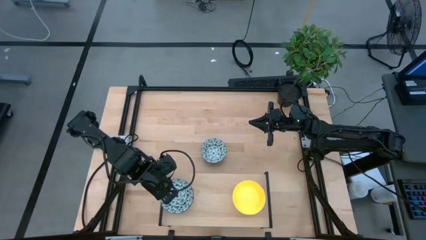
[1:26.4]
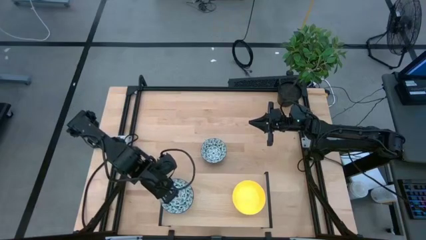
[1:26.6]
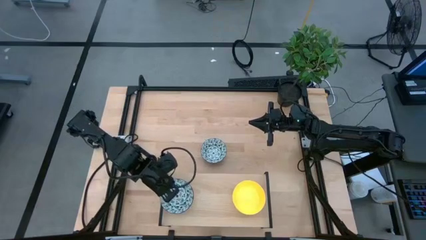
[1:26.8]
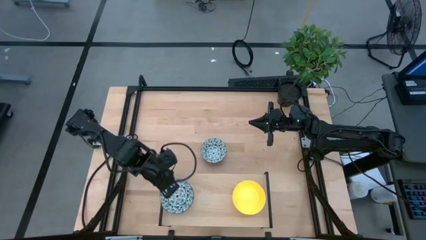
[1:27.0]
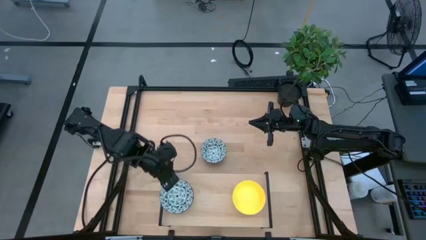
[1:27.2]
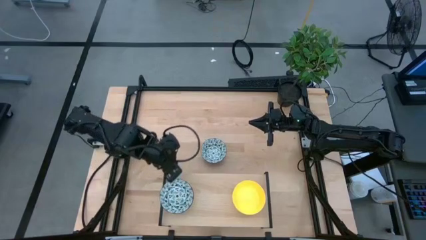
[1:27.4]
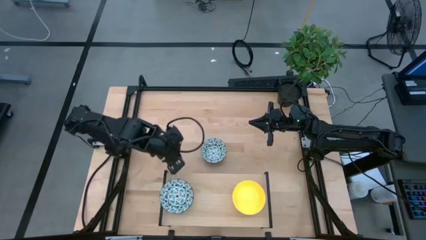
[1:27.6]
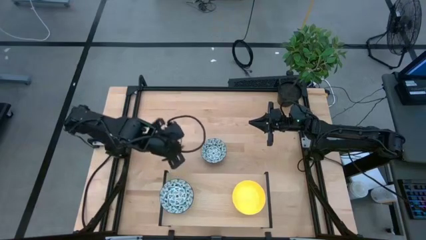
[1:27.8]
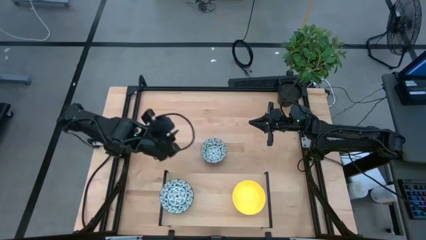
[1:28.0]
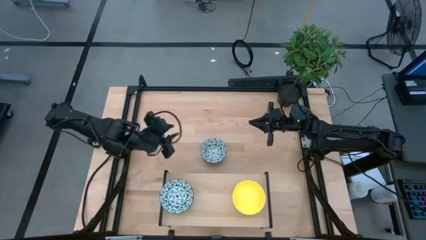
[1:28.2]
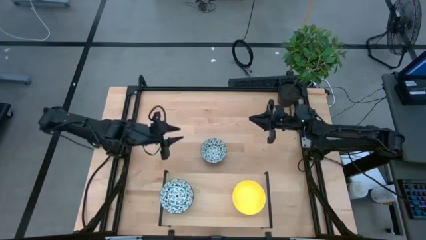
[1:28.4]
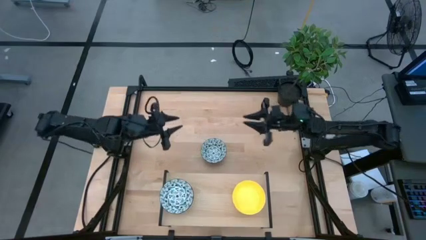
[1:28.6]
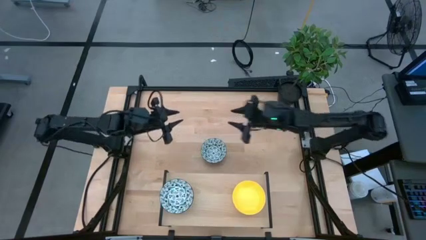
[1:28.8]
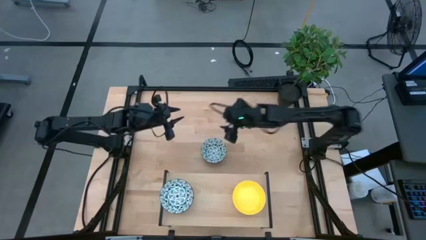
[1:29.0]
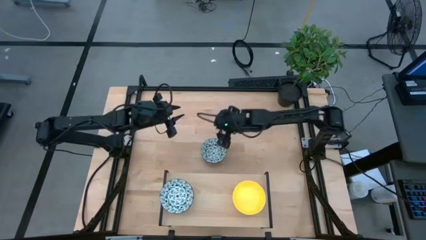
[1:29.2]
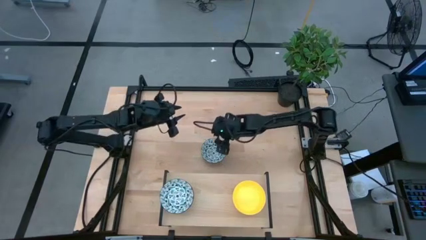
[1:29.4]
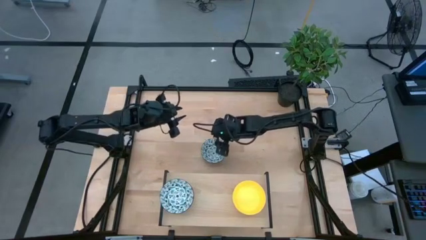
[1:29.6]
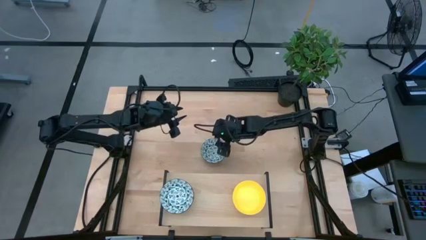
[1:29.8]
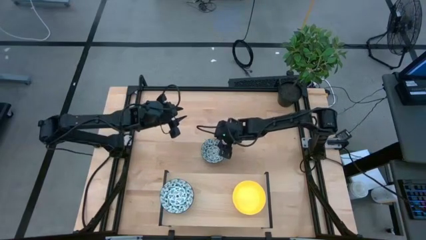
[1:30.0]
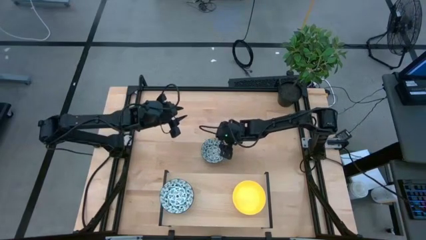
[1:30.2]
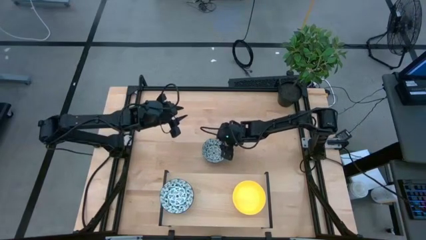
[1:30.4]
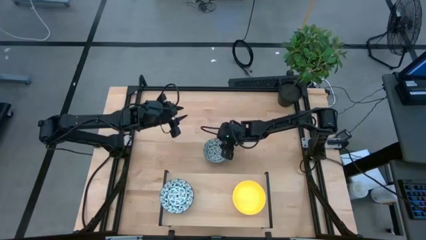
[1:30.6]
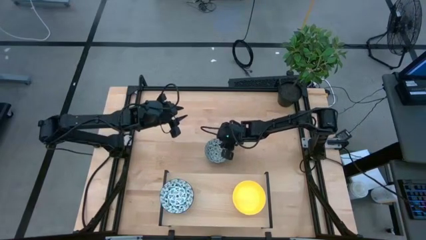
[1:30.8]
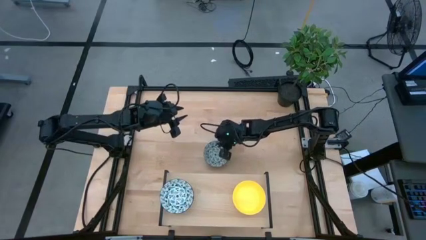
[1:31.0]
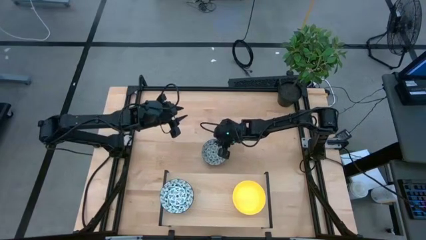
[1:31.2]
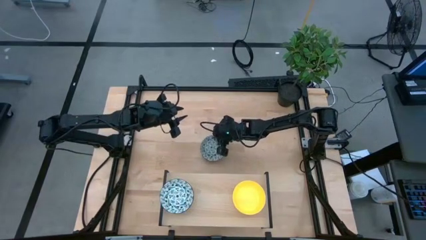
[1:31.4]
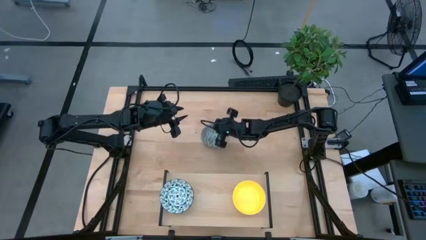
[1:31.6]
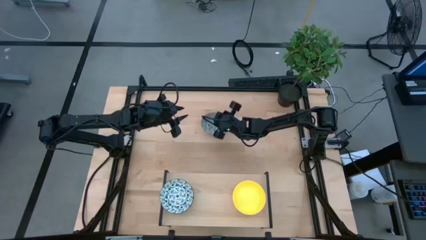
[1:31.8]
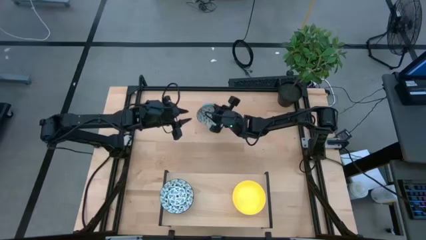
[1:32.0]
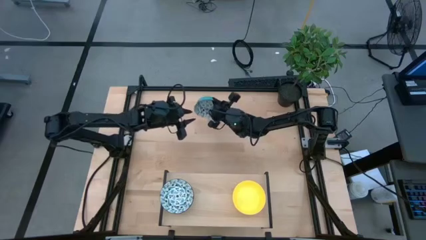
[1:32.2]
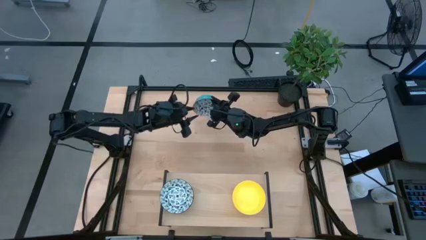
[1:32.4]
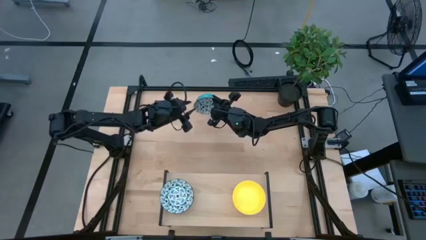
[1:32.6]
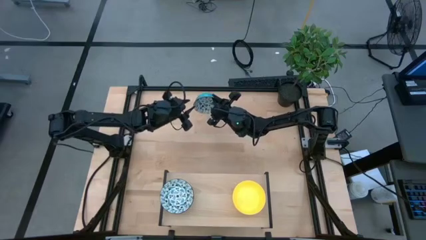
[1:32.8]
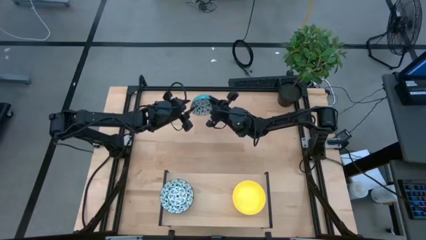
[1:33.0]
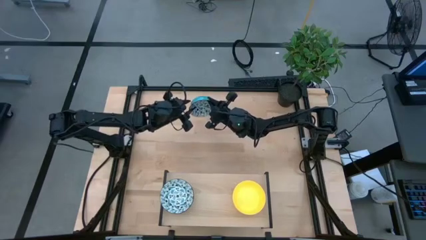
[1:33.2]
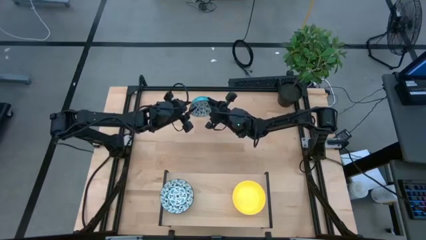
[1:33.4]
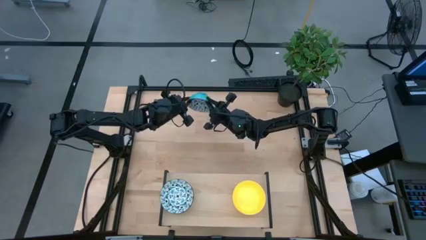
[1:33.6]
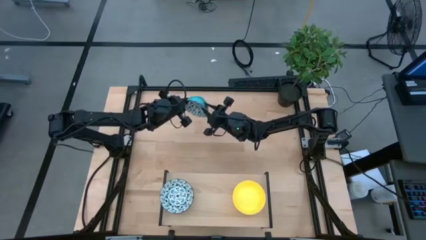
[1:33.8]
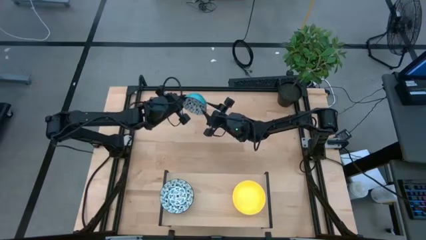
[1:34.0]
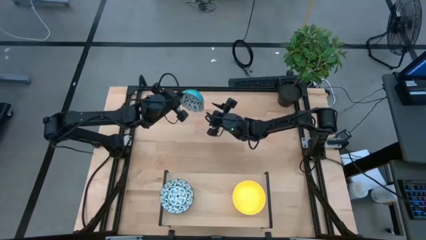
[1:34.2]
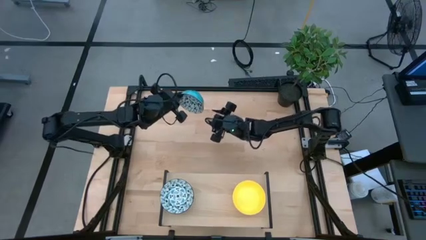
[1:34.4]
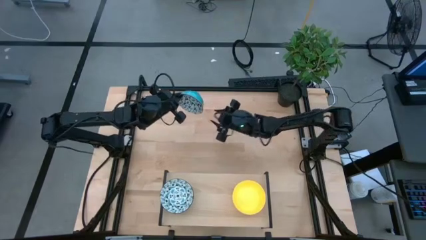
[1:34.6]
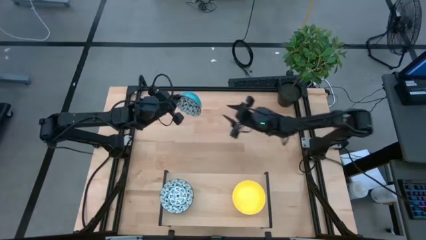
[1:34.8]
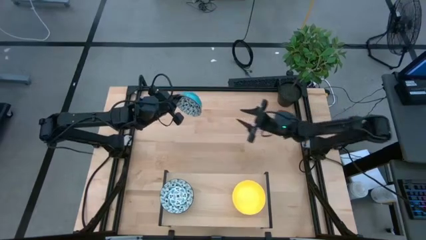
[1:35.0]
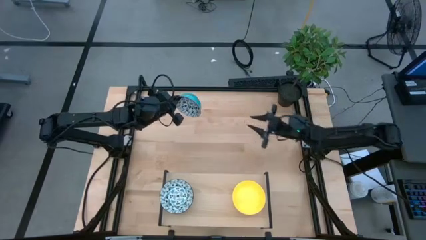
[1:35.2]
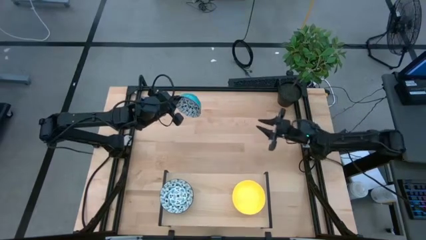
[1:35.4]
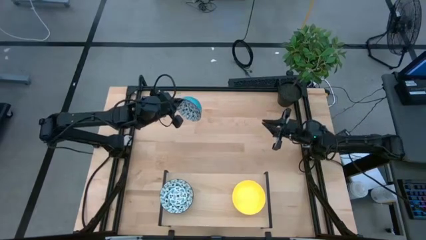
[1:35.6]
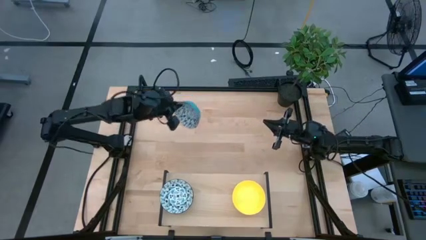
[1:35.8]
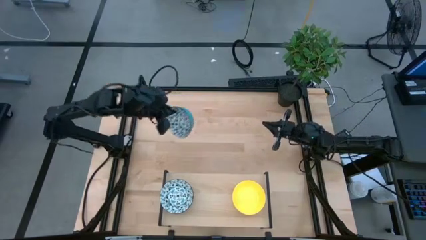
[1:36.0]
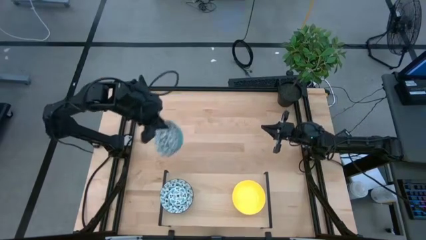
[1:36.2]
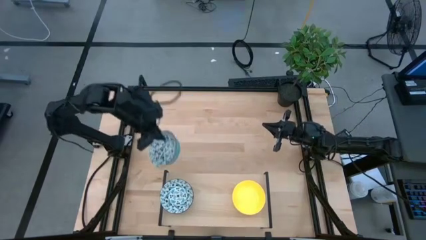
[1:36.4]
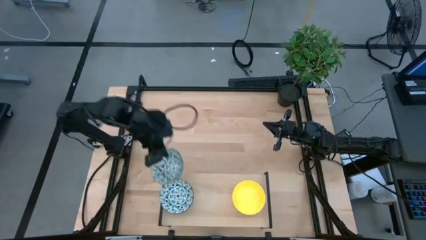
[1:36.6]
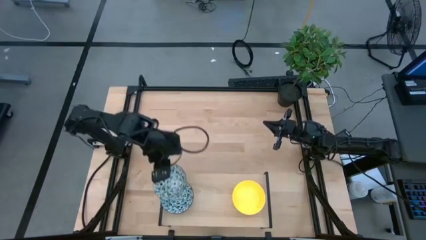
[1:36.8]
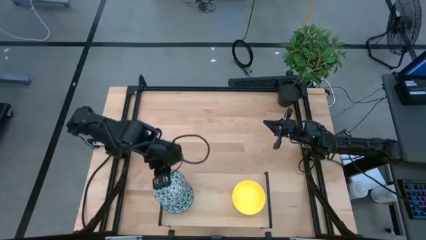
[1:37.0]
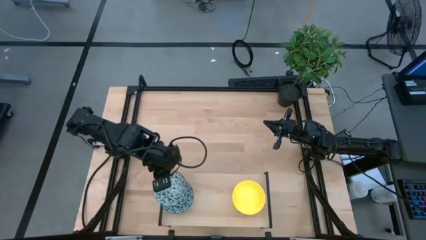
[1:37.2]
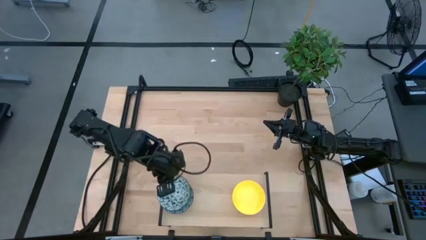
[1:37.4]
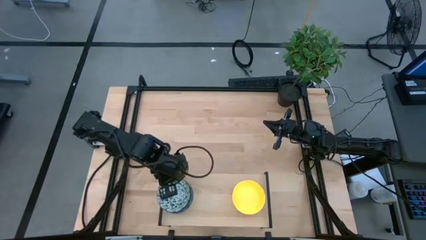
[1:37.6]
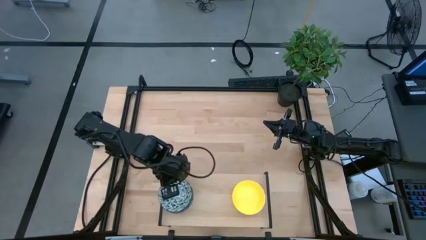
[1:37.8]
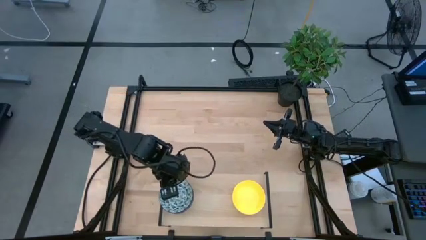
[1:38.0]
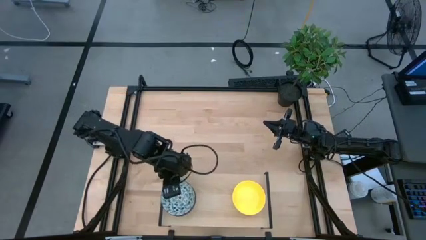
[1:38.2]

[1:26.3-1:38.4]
Task: Pick & Place Mini bowls
Stack the white bowl on the white bowl on the shelf

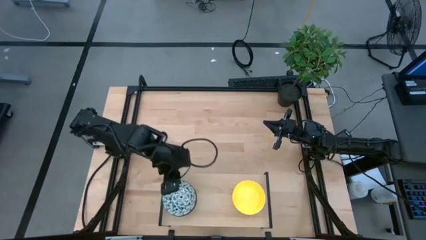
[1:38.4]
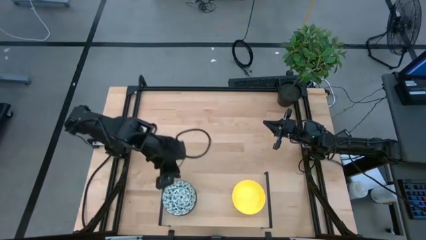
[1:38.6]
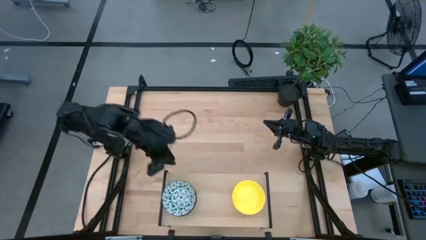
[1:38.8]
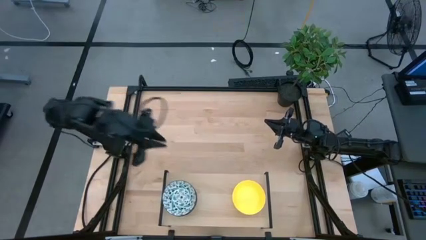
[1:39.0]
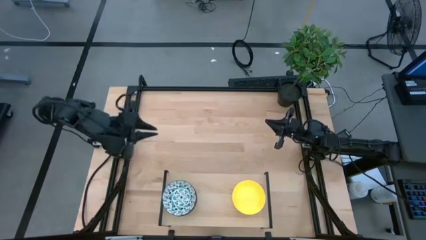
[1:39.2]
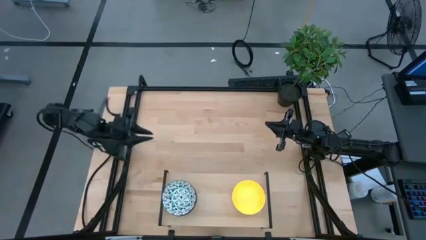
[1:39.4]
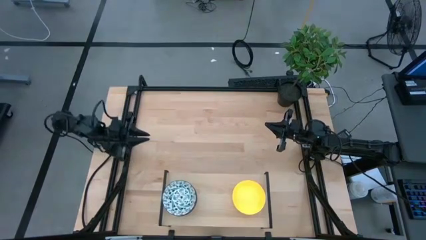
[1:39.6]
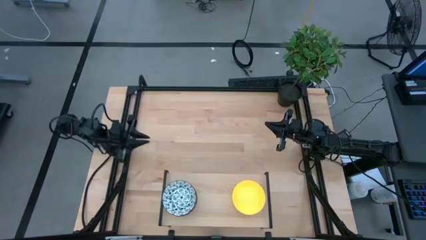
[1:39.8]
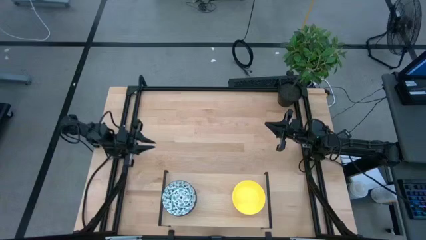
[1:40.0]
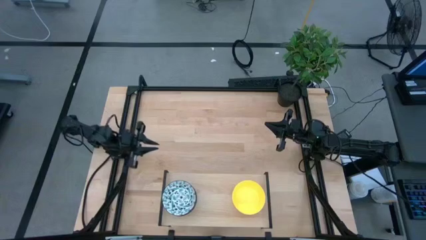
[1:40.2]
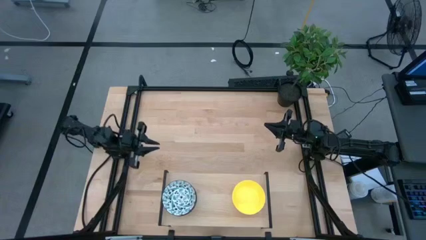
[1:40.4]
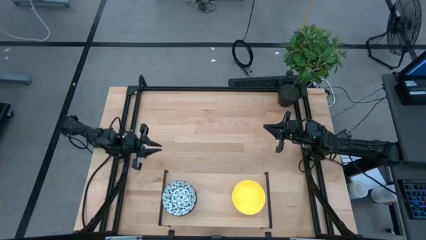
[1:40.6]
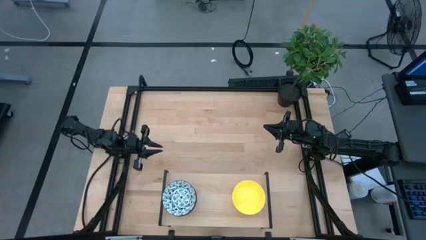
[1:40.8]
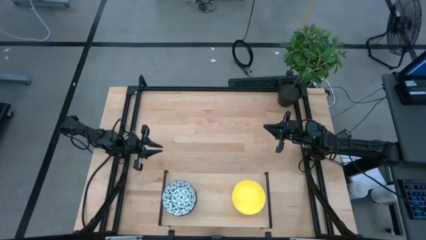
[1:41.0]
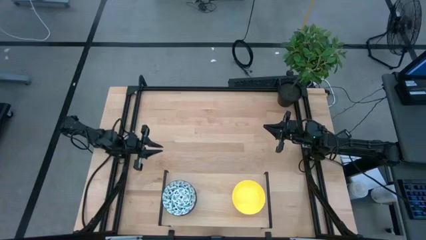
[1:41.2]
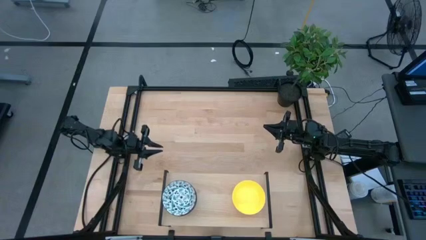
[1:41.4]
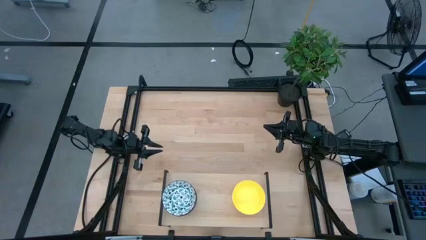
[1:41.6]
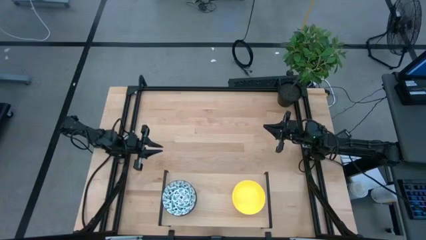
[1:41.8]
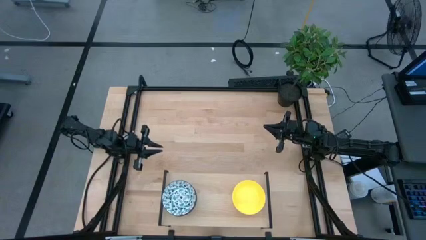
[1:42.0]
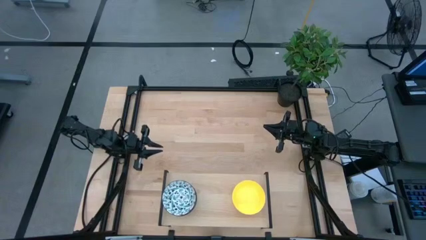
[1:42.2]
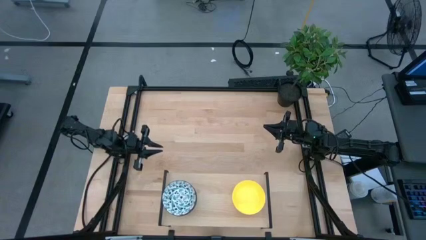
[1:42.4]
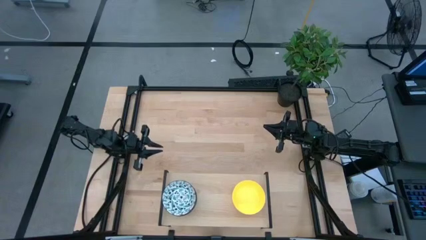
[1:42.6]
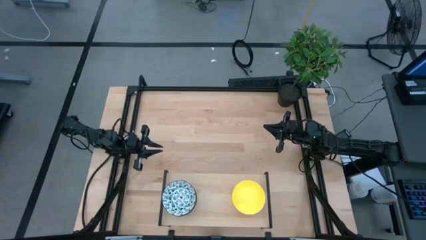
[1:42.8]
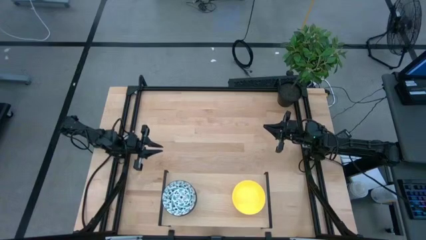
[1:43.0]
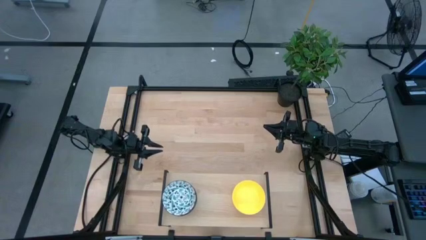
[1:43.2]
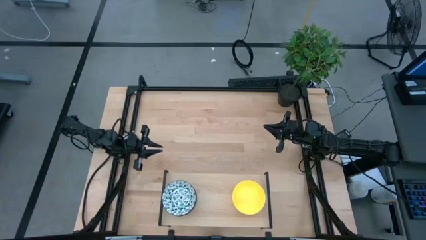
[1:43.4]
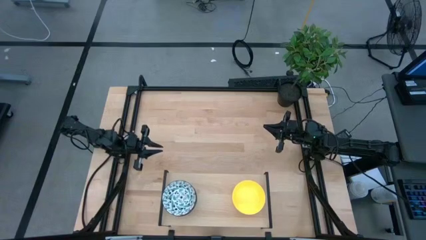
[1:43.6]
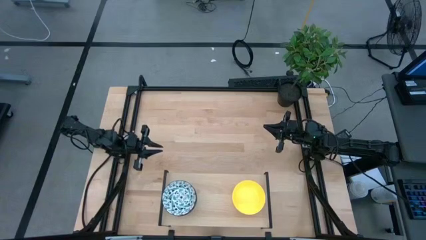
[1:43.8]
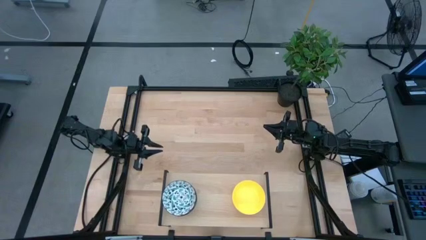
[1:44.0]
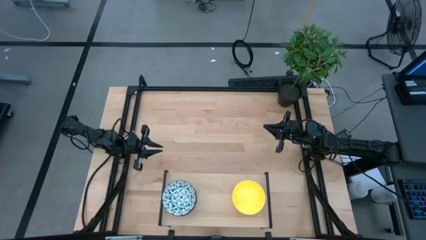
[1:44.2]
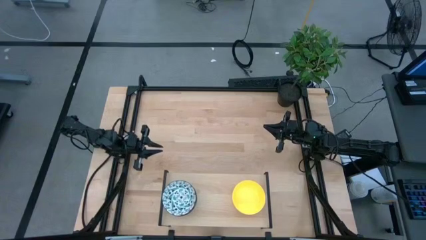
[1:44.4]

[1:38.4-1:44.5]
Return to Home Position
